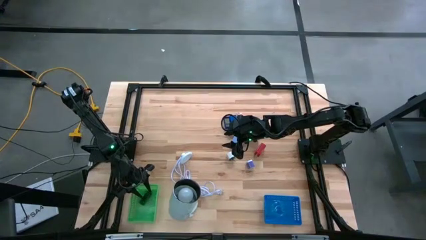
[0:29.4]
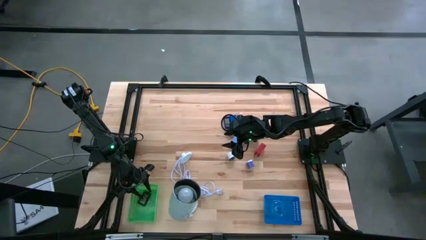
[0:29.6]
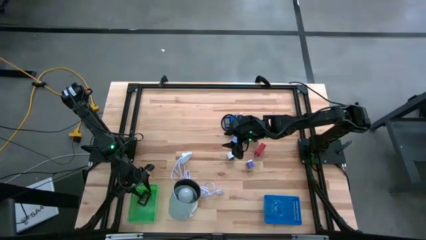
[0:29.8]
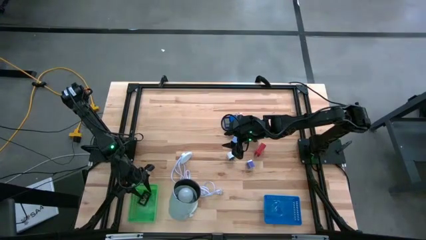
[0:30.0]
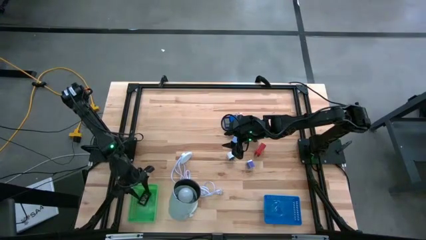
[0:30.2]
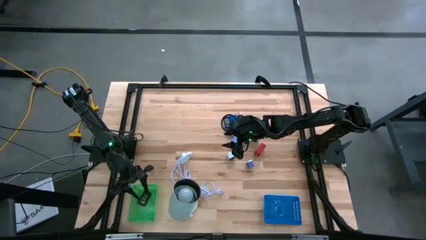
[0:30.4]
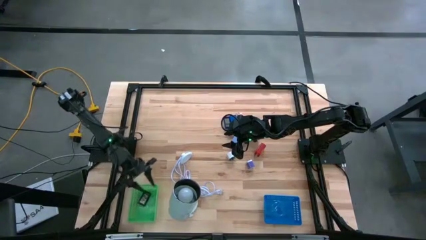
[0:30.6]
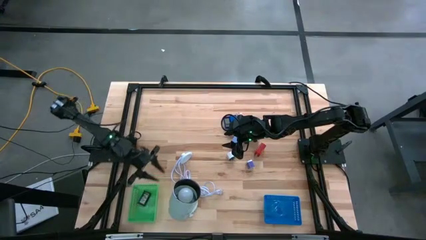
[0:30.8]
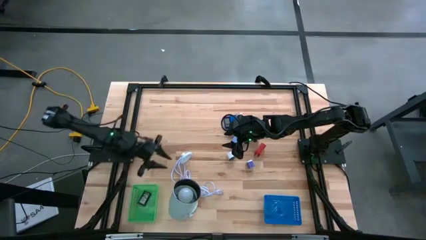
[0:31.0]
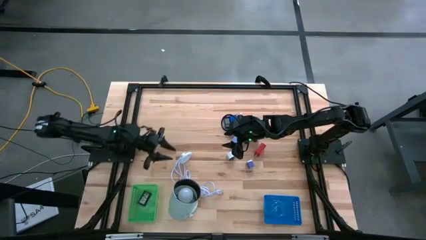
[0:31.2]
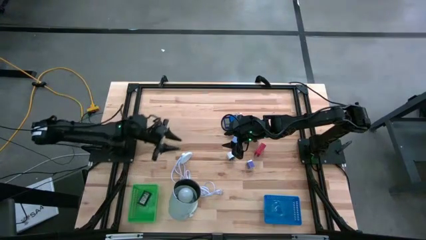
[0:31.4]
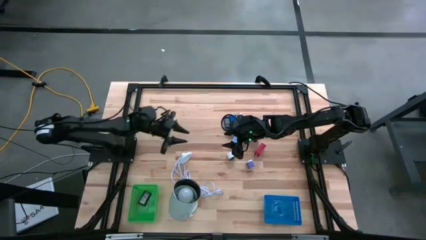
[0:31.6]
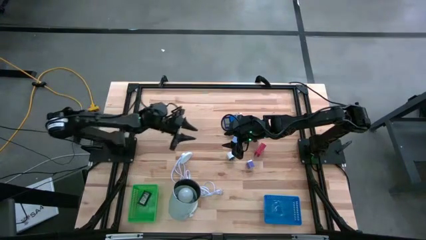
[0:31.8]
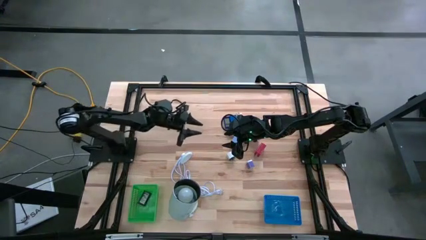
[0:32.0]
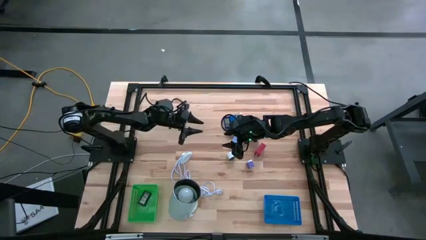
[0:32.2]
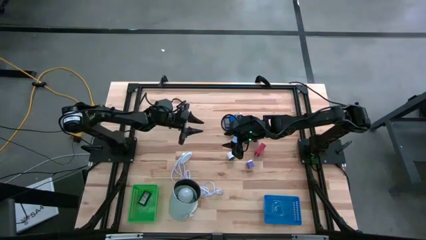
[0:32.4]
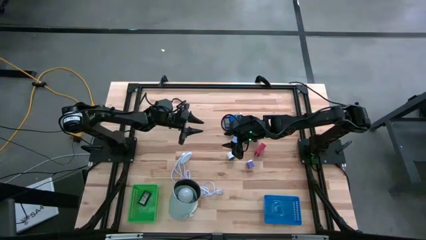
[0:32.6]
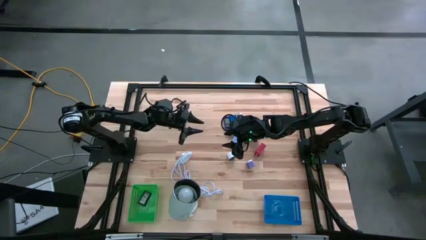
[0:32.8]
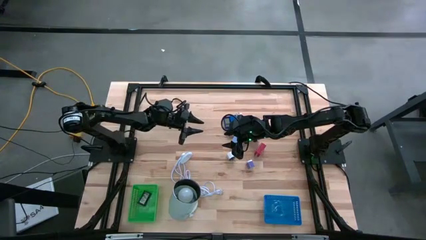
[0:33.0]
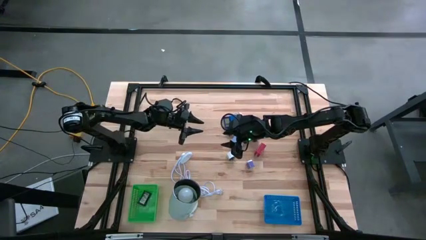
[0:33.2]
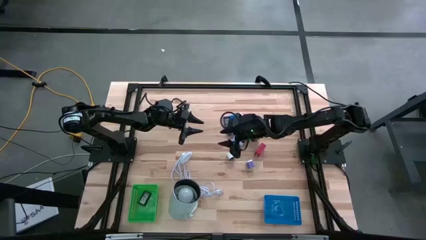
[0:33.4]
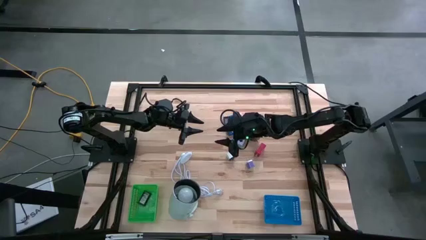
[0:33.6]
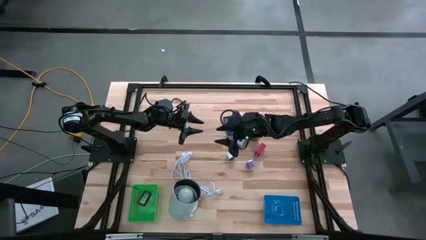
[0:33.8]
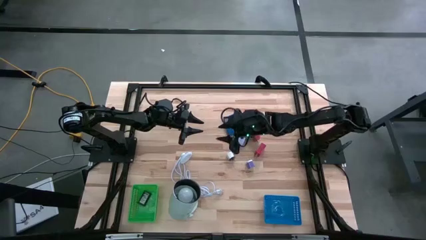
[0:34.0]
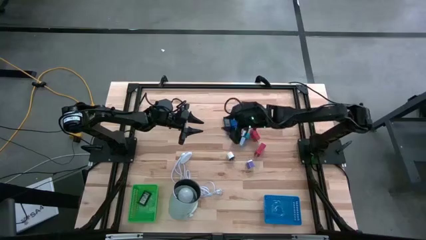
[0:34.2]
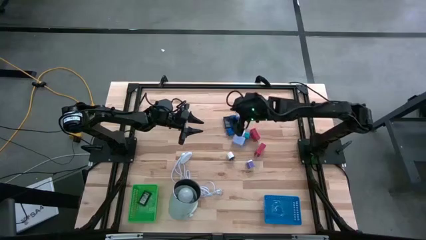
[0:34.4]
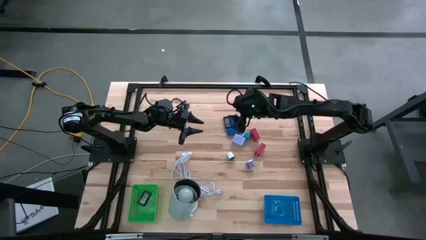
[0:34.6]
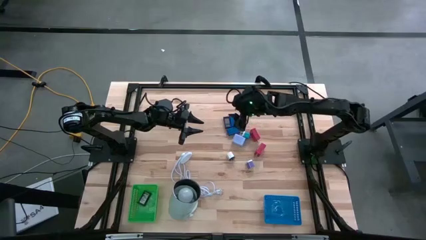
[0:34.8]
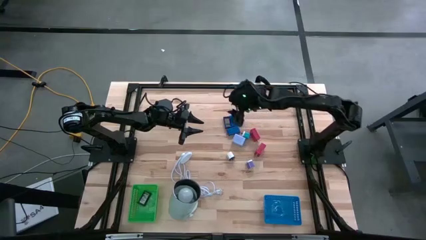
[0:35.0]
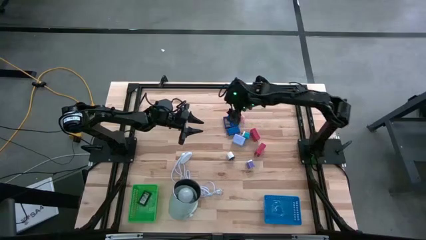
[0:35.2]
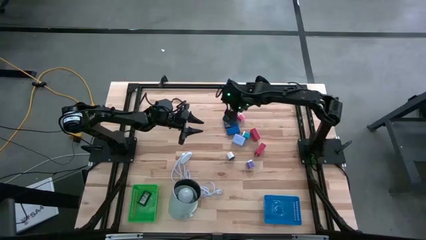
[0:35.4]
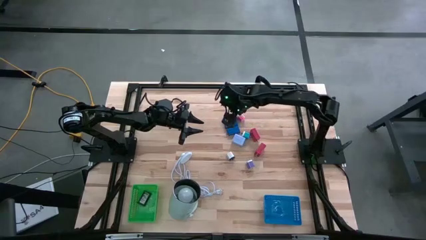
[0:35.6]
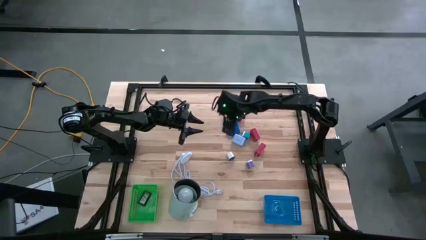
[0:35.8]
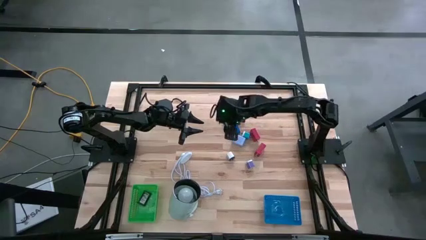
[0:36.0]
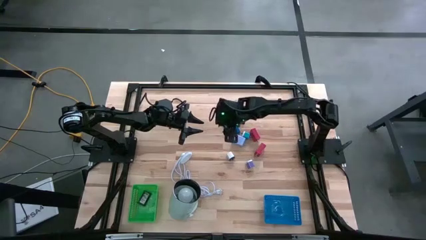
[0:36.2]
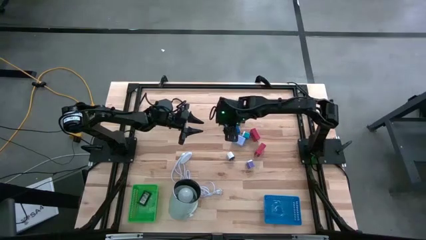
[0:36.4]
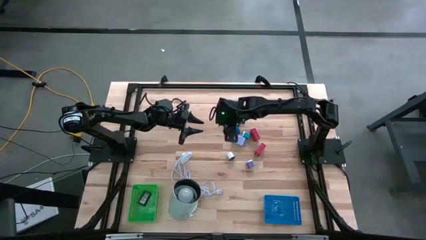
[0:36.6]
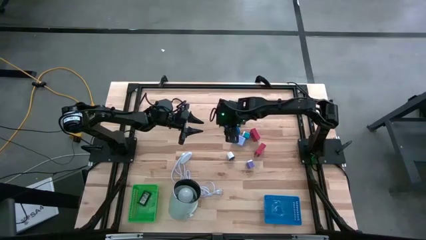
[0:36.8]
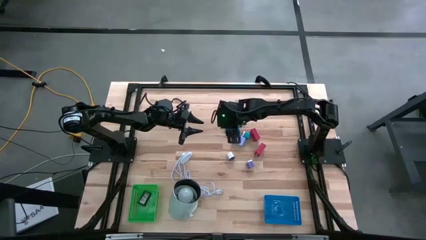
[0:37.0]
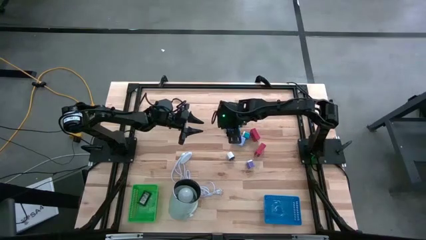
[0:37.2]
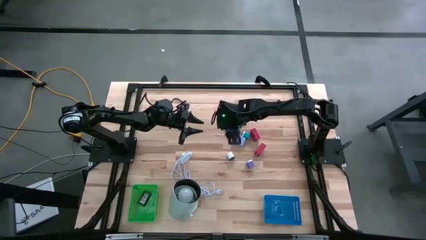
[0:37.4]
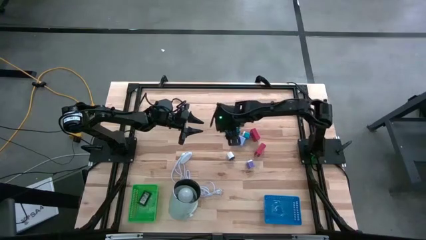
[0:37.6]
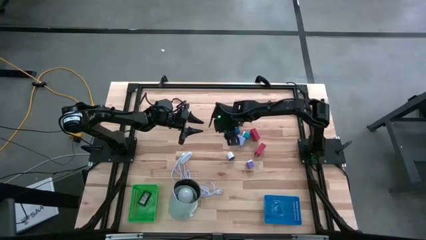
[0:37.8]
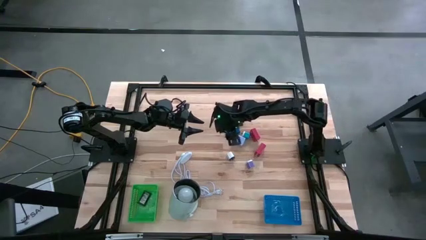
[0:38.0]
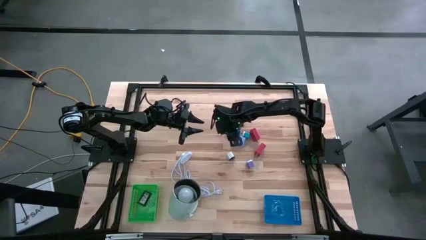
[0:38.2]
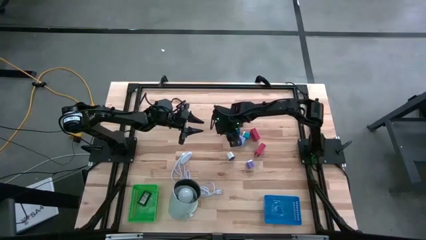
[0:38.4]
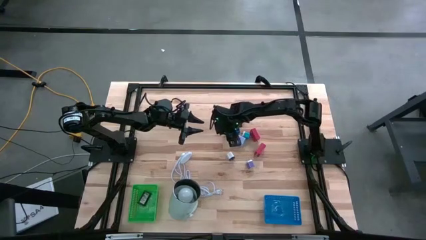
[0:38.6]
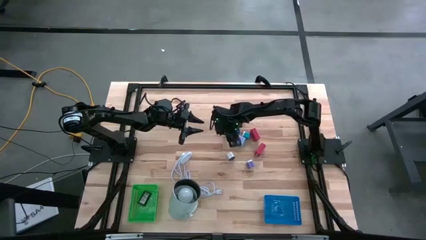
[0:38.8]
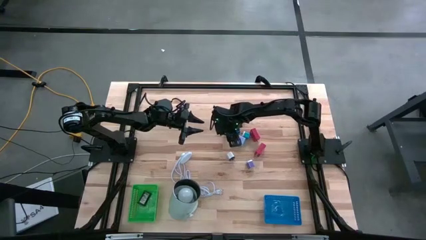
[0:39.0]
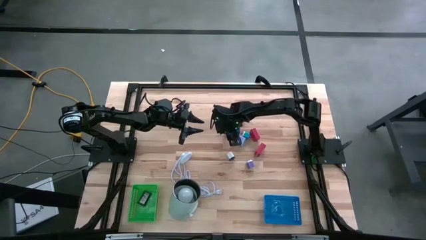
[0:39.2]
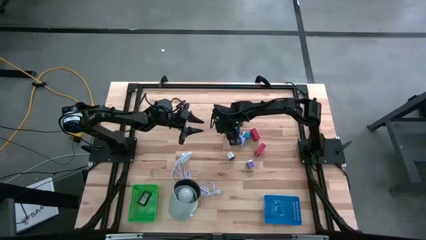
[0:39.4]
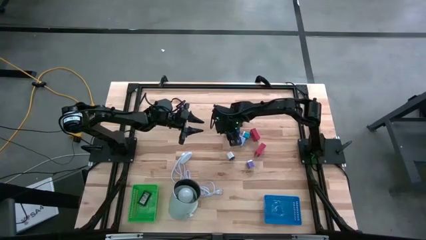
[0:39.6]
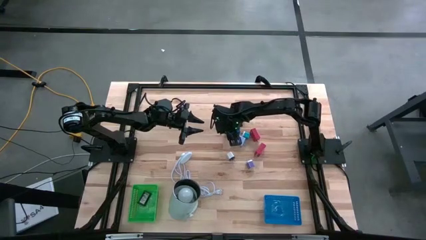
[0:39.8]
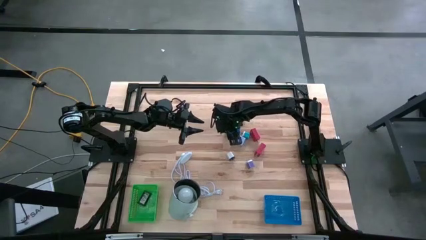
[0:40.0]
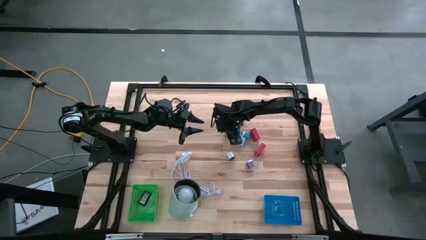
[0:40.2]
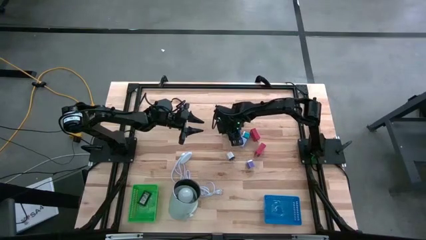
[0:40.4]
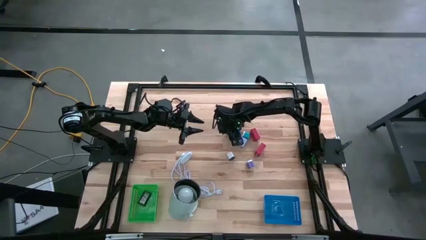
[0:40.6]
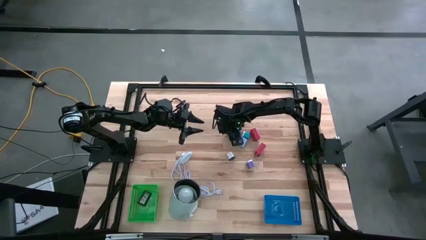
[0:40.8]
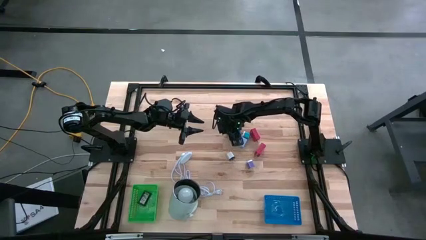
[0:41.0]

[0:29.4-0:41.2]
Task: Pick & Place Office items
Put the bottom blue digital timer into the green basket

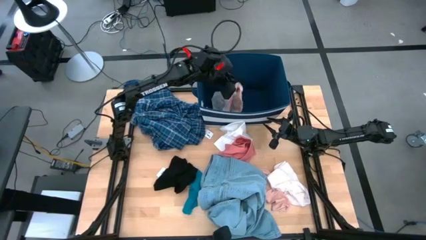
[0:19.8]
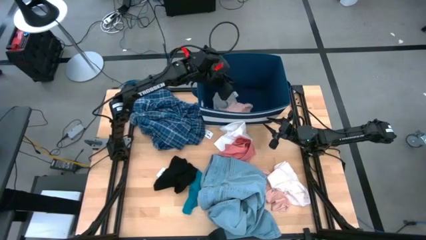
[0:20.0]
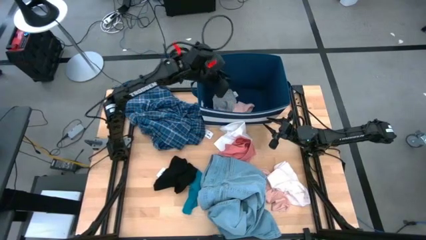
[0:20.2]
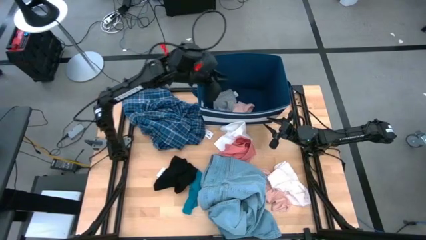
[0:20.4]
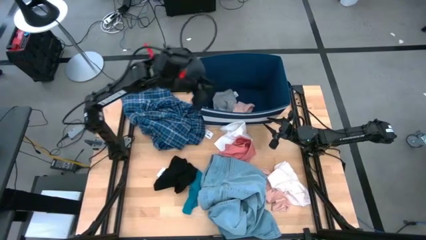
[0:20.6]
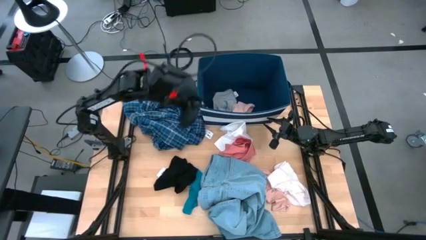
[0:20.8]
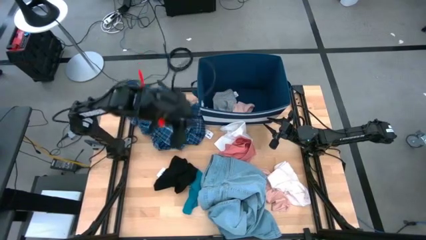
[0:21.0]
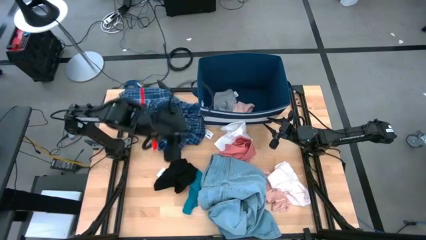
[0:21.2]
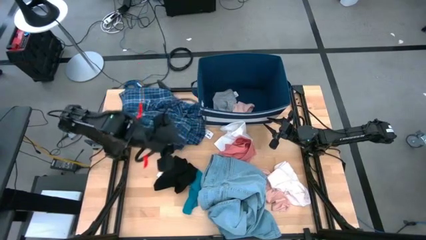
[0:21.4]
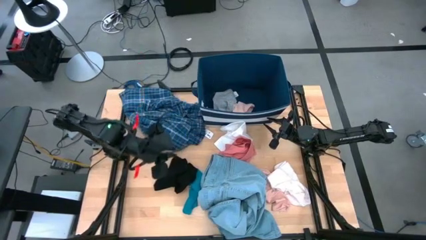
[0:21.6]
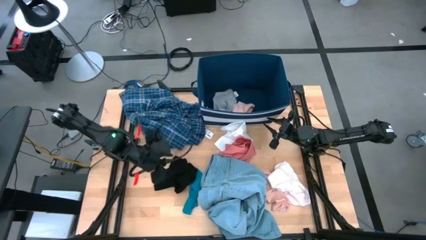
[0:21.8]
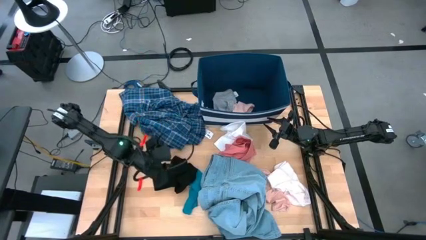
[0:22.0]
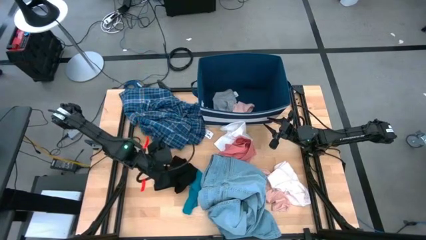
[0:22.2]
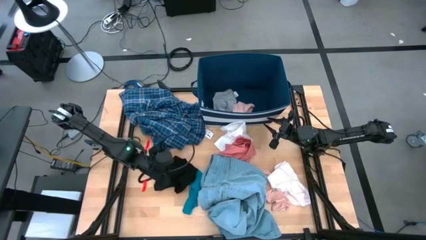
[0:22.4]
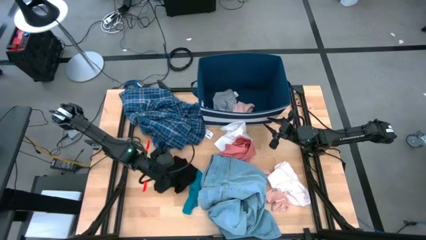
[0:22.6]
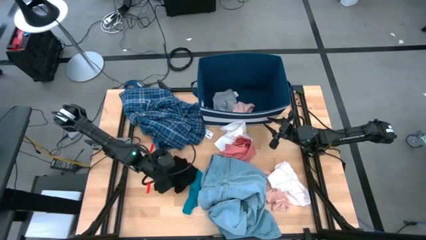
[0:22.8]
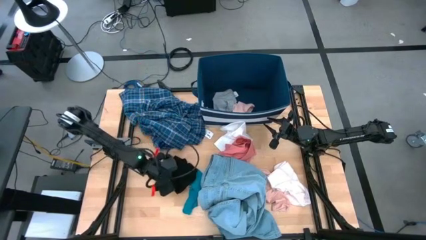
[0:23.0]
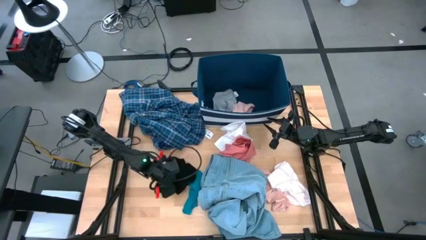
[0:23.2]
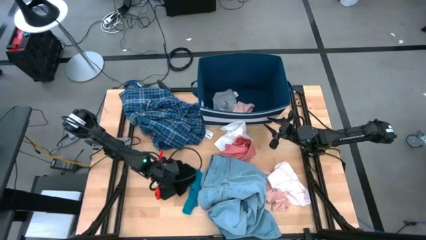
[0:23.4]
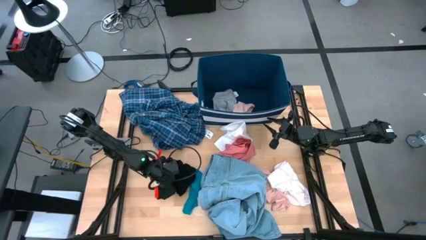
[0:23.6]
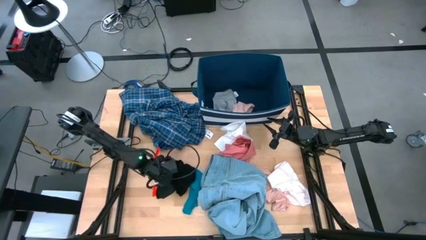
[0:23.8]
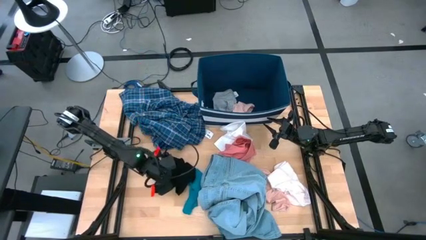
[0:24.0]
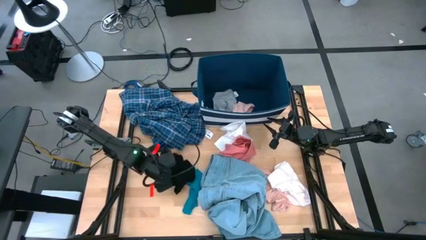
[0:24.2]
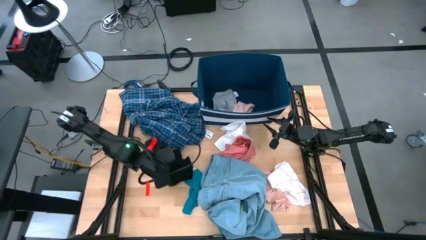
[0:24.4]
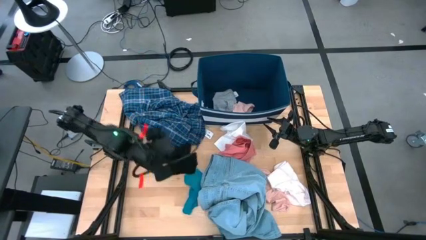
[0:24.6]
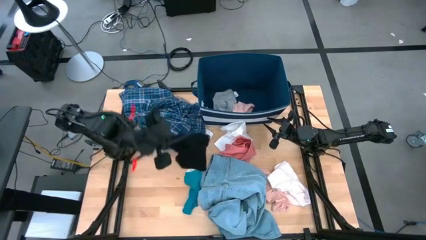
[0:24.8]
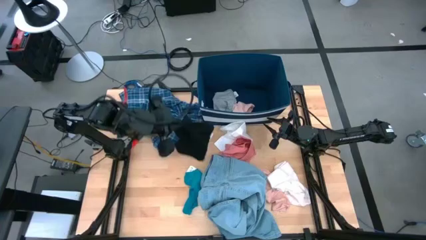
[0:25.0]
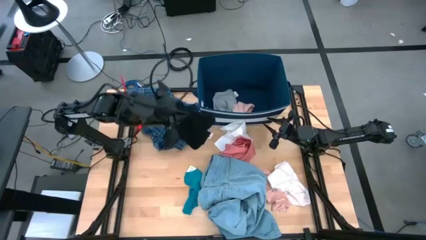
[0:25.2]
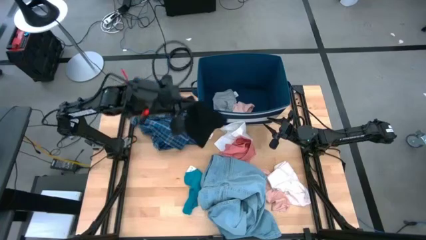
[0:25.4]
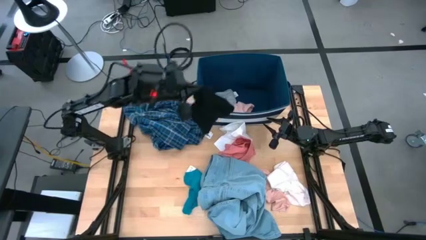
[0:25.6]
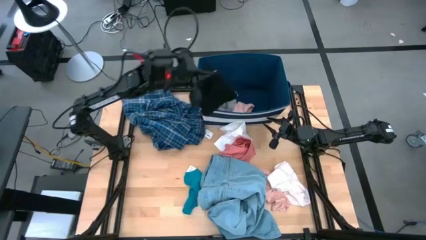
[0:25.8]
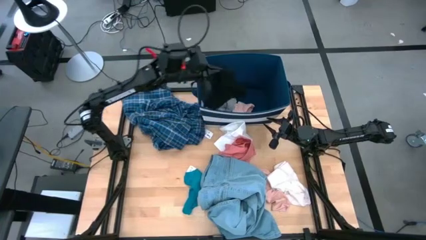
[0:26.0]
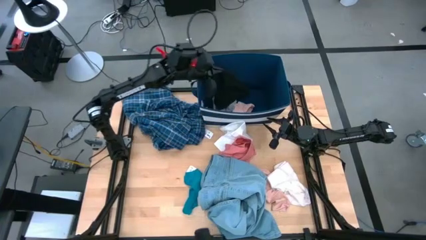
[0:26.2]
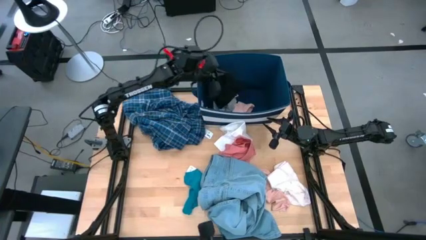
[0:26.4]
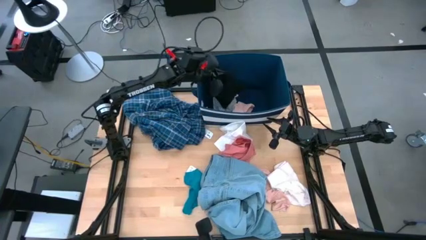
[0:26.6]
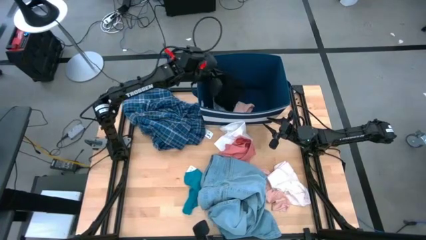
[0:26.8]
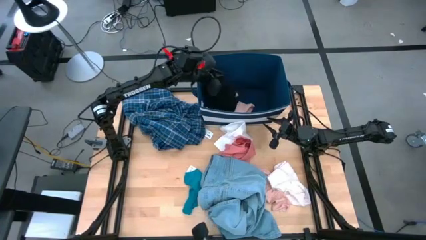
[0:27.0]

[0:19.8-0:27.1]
Task: Sort clothes
Put the black boxer shorts into the blue laundry bin
